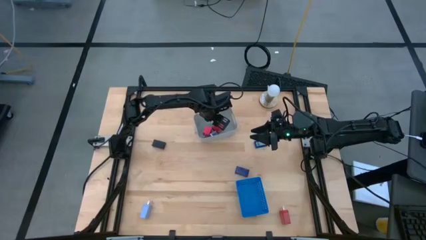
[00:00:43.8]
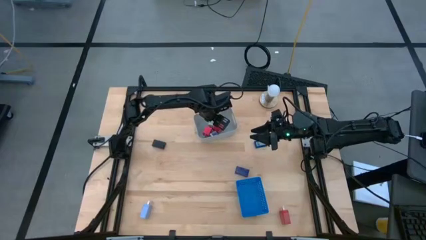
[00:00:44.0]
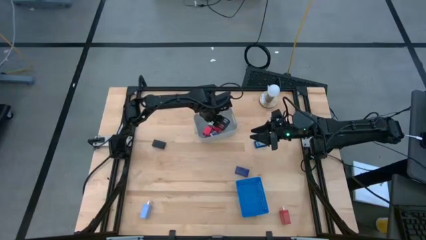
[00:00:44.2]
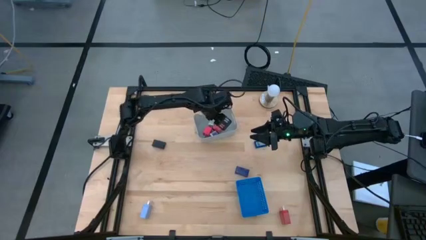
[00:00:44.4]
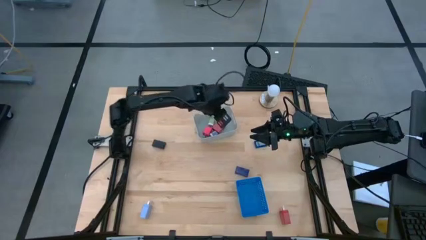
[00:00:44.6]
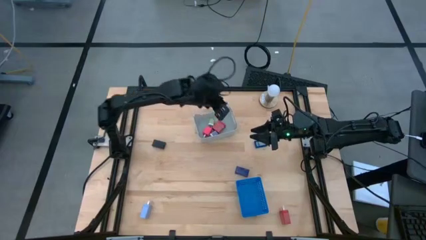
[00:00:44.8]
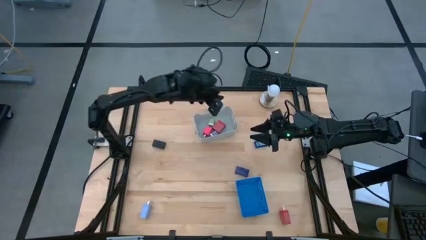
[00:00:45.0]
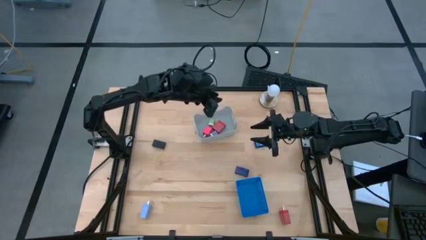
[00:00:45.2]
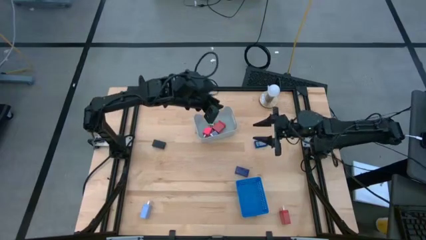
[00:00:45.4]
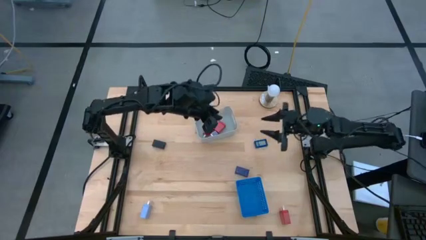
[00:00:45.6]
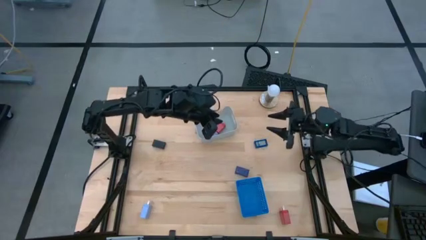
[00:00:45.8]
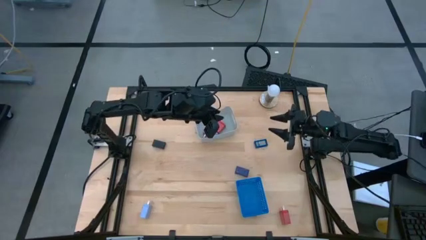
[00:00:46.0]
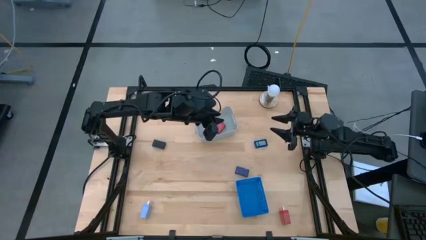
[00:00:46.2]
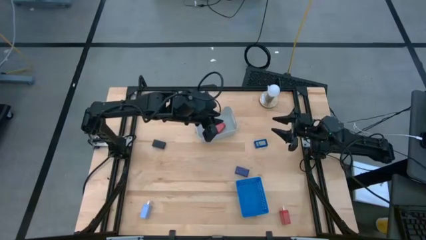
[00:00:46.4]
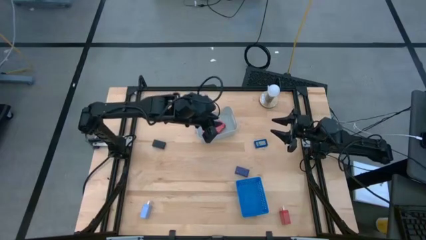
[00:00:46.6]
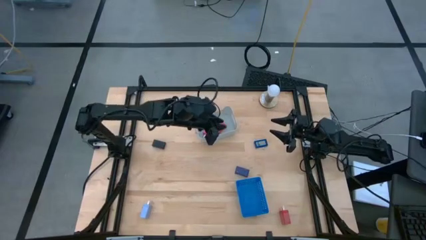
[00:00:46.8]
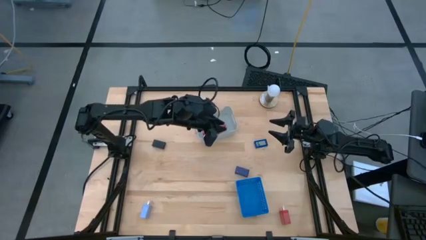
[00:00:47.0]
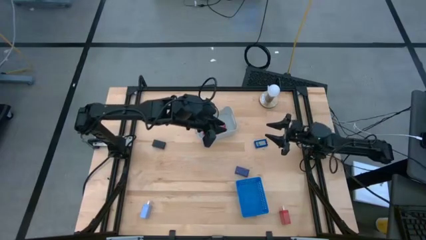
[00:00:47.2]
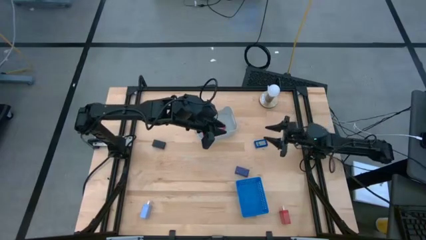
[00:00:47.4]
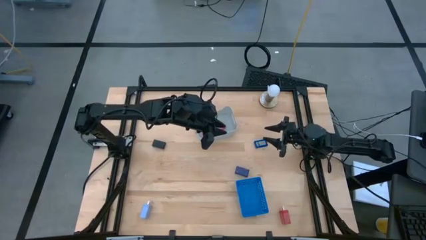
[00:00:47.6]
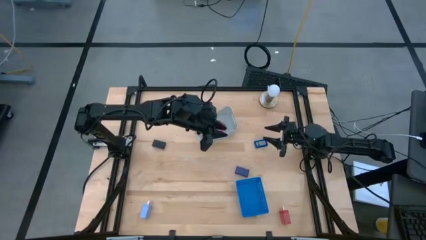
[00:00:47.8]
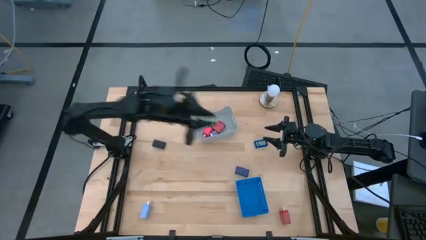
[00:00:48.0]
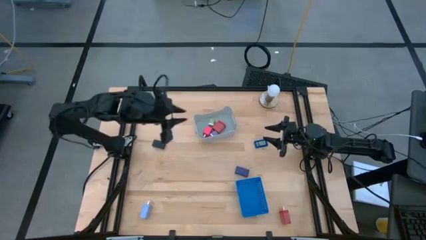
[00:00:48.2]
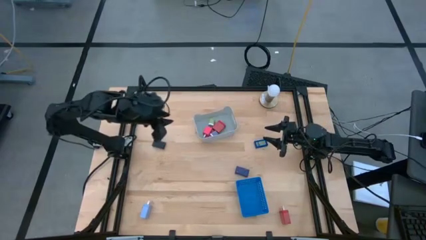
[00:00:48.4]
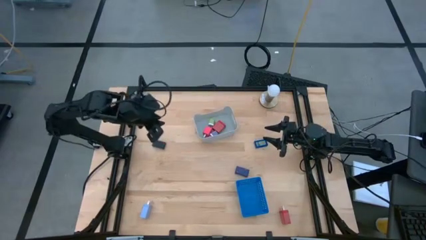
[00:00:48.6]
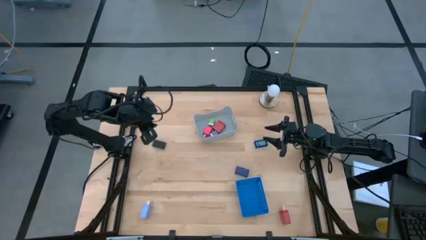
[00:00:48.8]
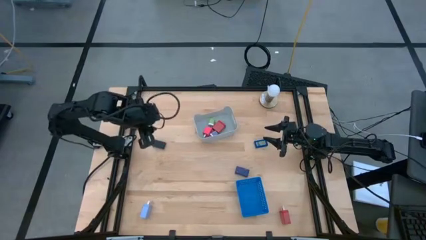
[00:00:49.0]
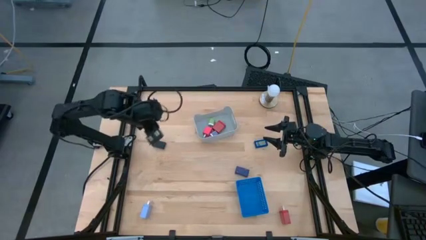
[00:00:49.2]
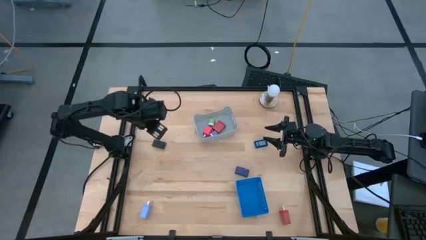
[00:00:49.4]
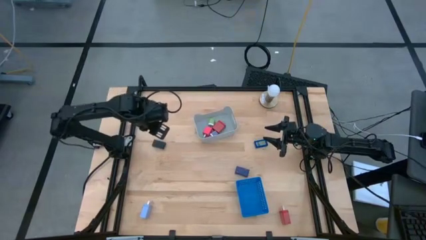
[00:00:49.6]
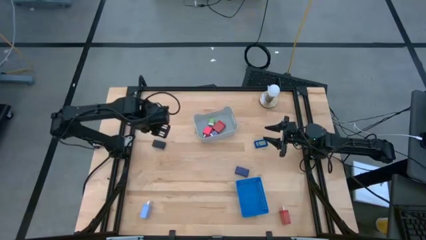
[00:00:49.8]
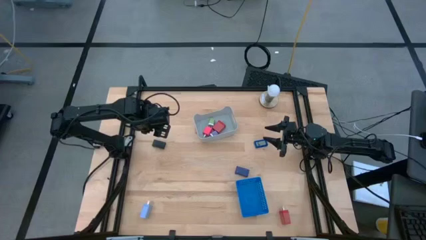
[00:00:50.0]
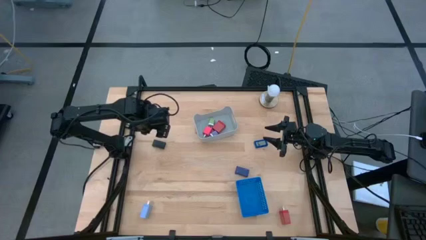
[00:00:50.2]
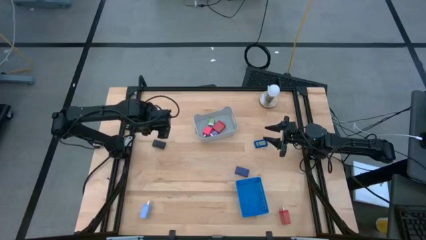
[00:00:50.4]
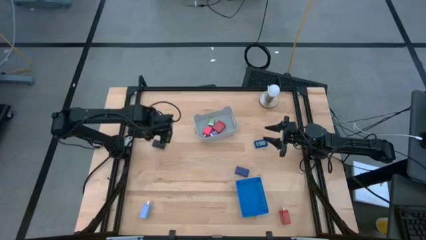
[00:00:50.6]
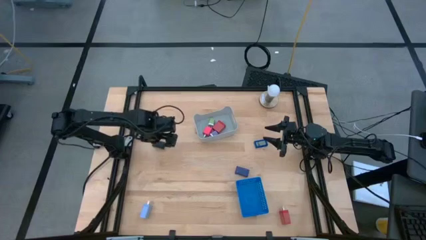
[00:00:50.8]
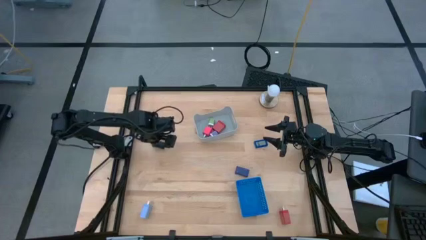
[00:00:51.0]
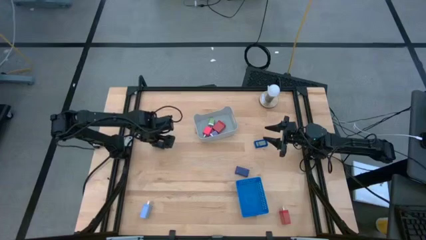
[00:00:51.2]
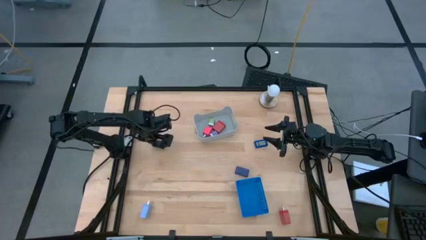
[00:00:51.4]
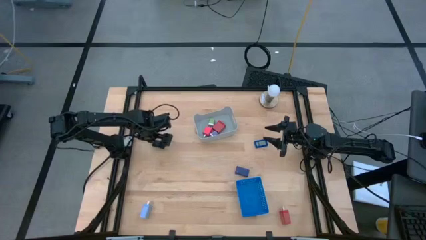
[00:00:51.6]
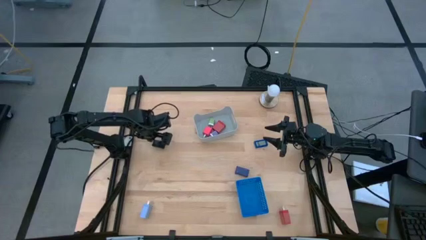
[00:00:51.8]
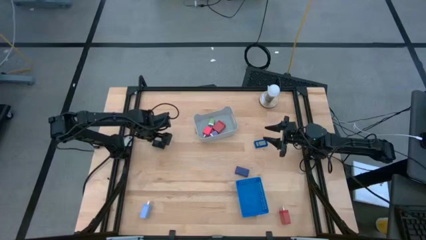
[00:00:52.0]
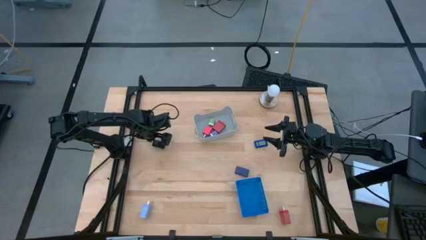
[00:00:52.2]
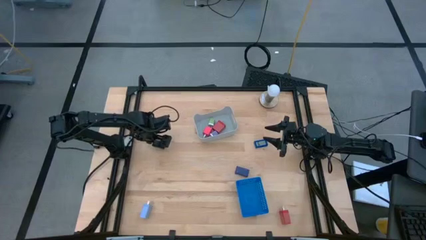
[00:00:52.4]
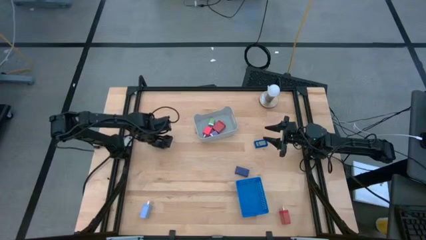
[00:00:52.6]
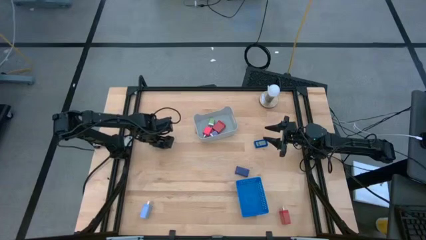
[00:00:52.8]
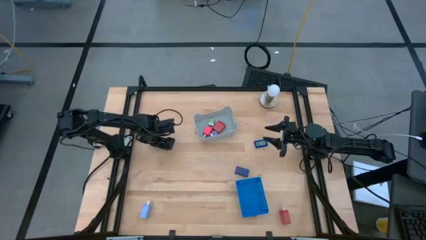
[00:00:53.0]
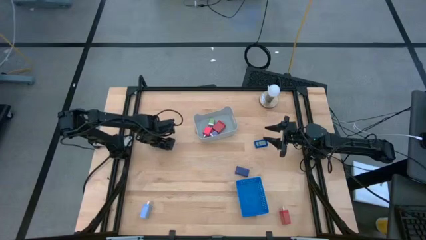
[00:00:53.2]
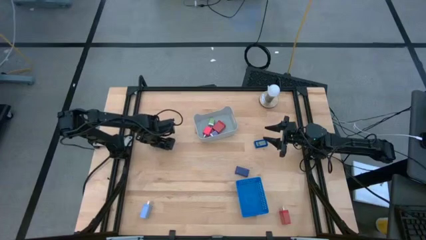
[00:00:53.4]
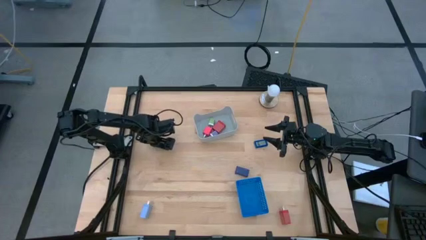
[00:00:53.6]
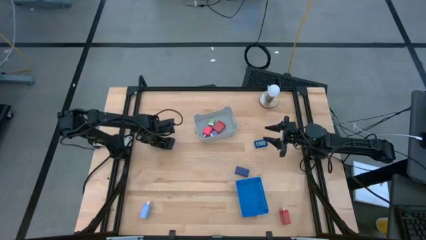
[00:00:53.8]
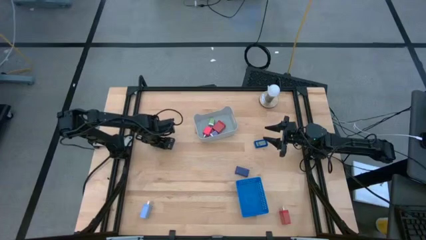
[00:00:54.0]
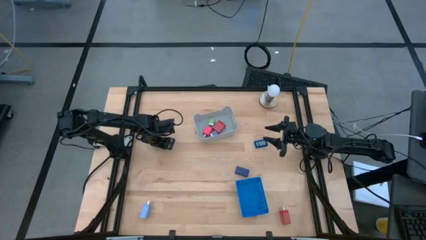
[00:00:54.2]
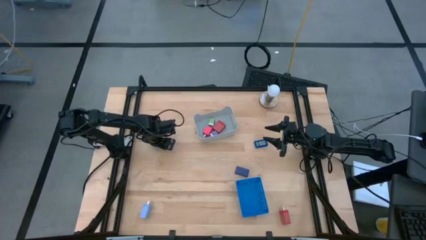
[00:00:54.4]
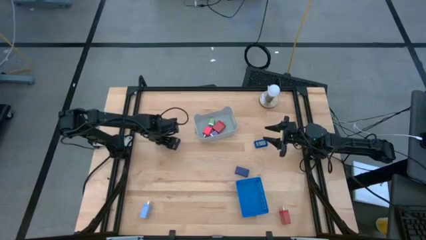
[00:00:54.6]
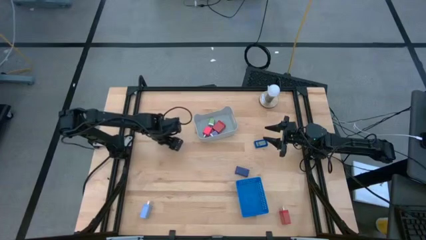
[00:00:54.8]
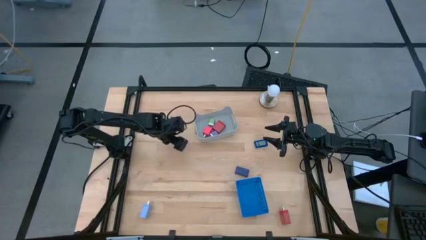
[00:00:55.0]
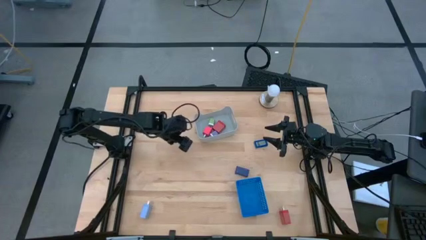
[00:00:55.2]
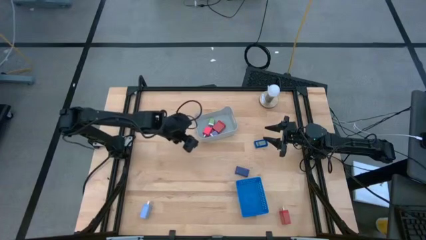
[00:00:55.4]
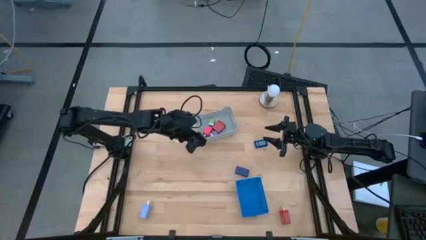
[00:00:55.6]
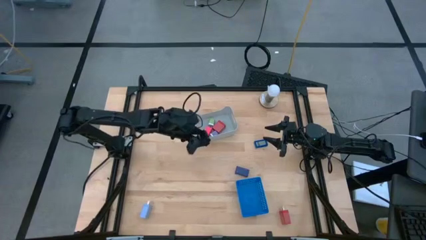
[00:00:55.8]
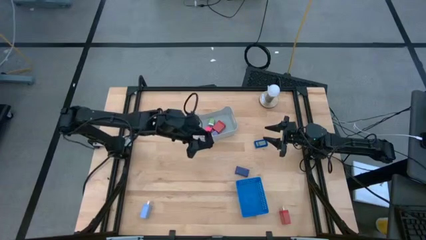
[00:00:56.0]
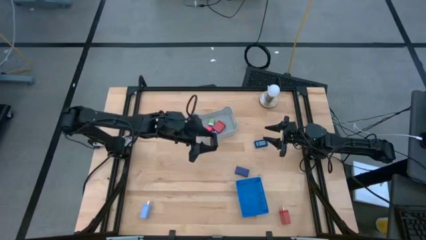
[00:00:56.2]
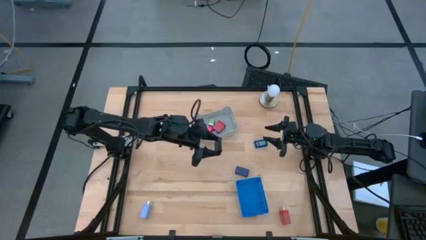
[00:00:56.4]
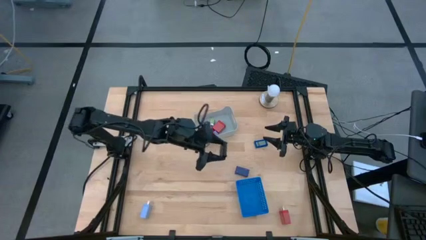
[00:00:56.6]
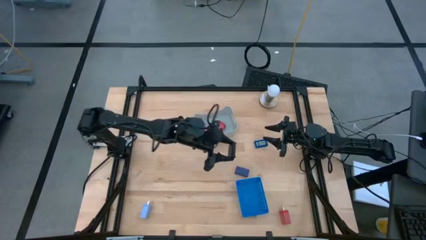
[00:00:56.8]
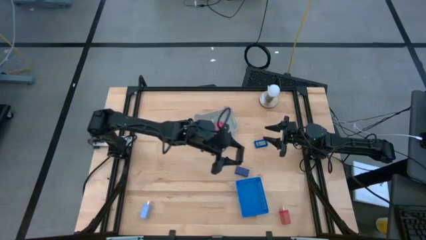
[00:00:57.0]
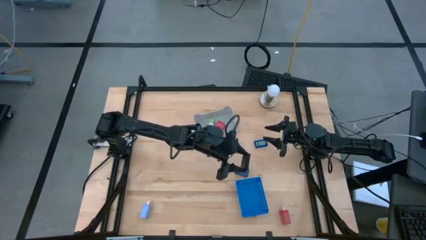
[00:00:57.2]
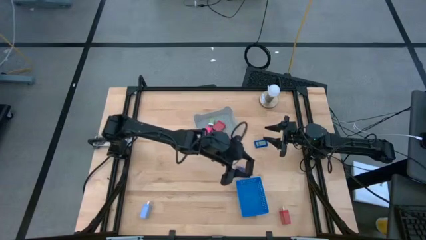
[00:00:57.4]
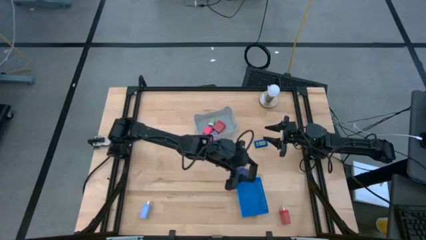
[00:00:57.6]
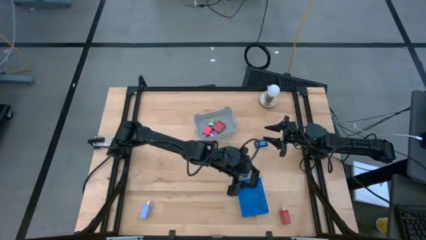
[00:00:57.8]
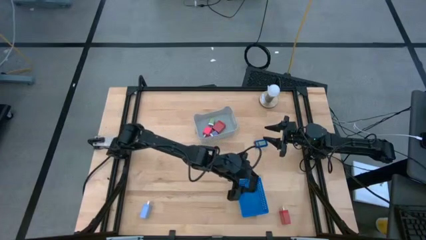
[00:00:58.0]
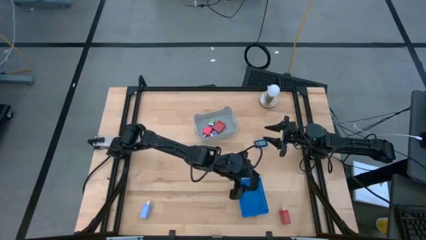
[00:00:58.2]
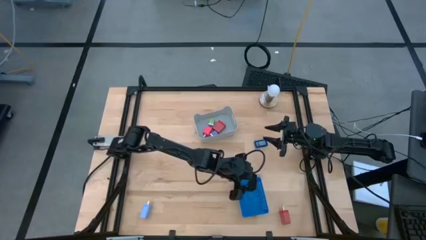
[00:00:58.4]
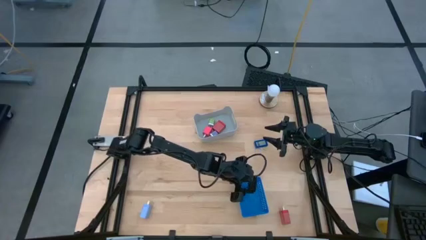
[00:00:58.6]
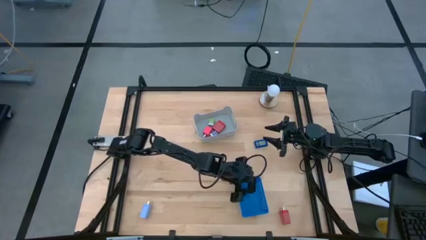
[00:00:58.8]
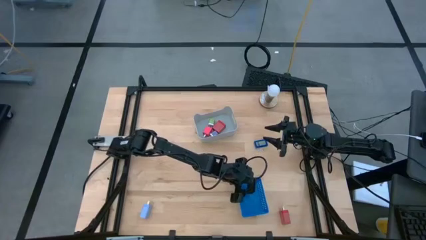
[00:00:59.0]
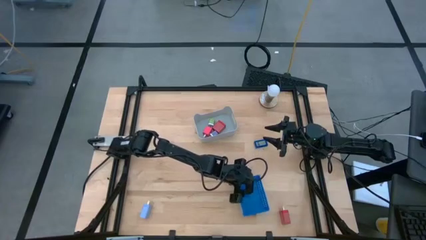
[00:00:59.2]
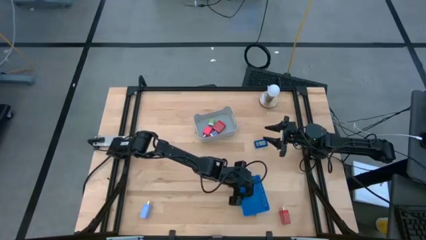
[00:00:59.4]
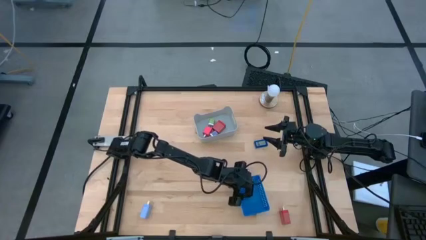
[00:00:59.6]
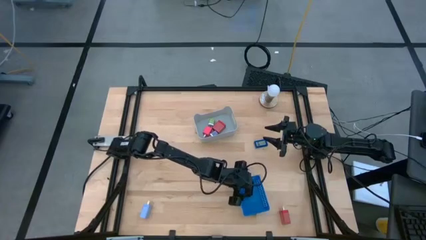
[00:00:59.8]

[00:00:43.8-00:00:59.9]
Task: Pick & Place Office items
Put the black timer into the blue bin
